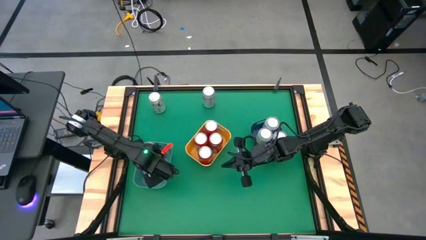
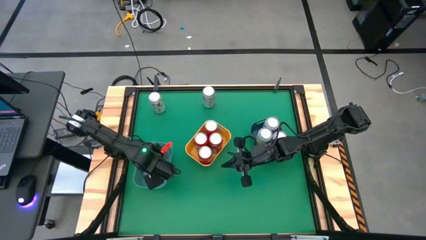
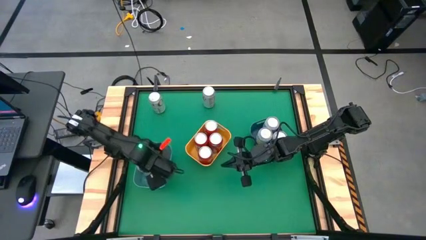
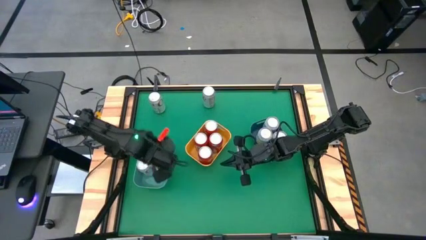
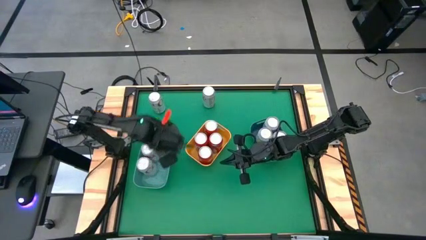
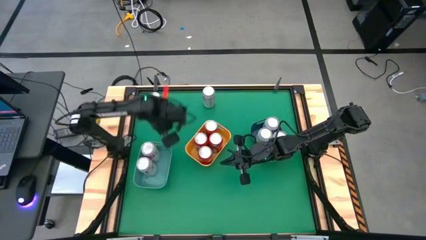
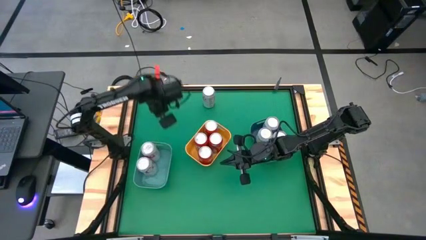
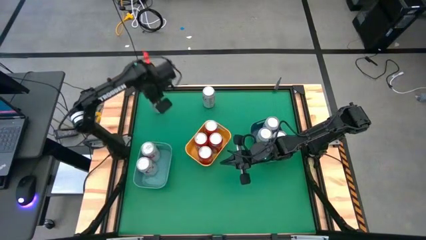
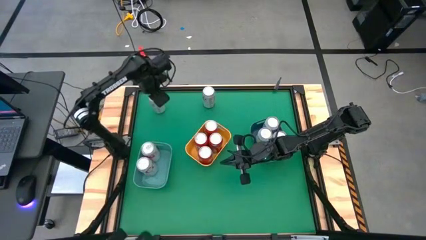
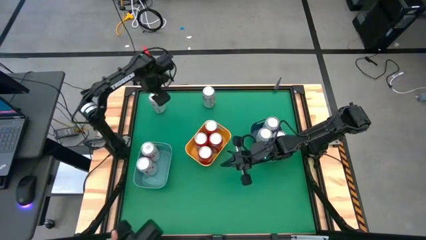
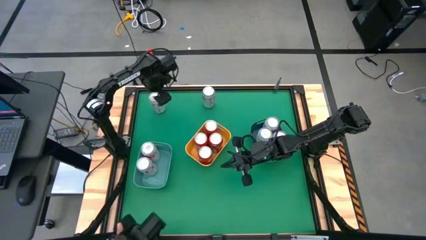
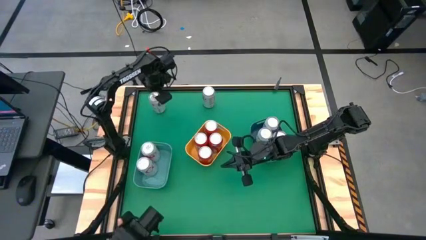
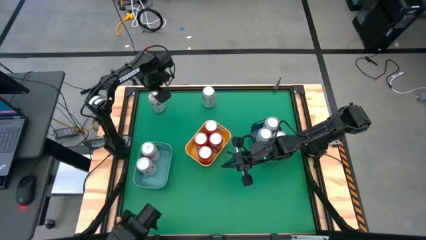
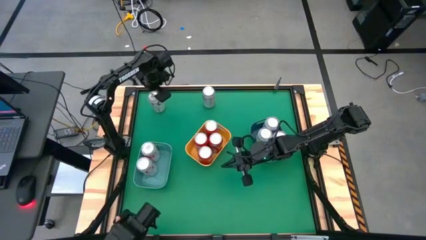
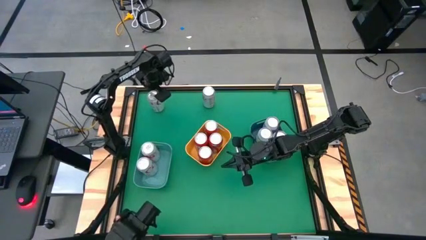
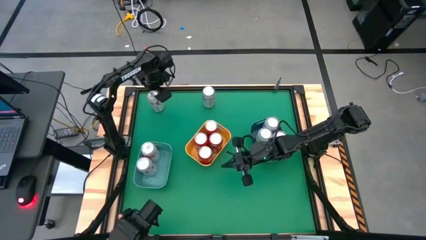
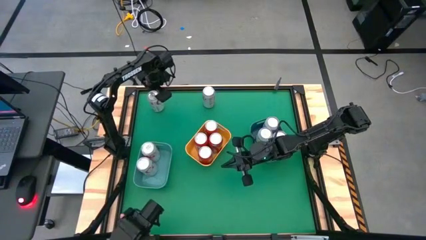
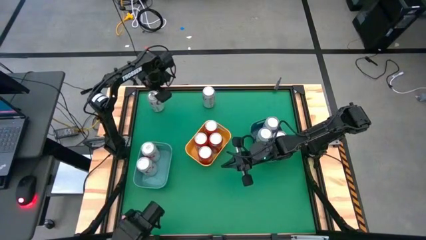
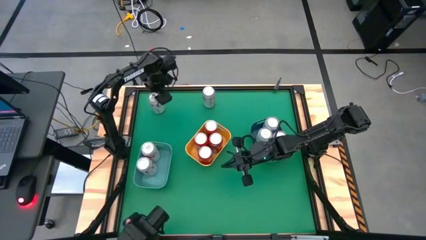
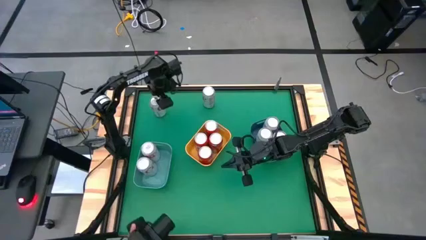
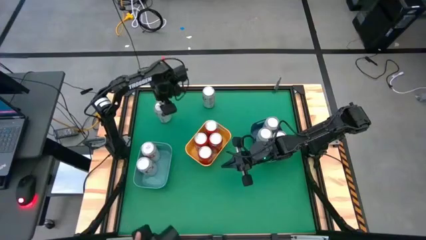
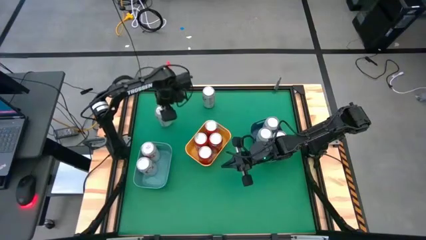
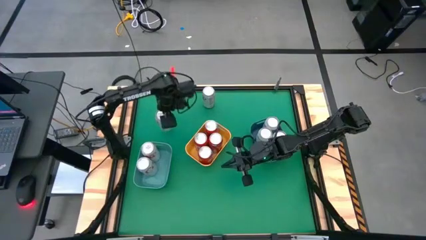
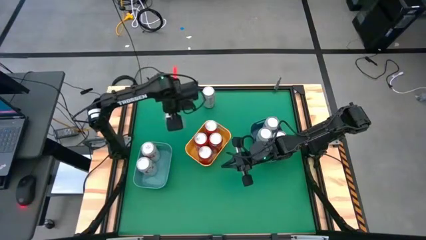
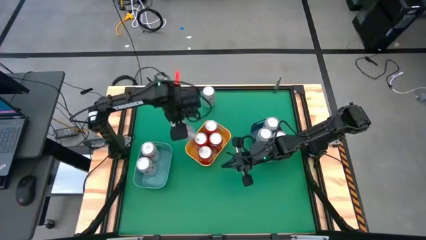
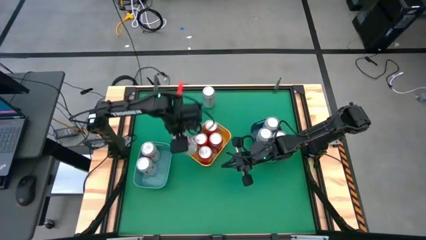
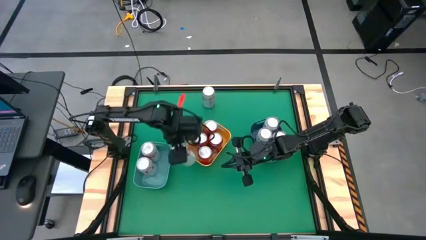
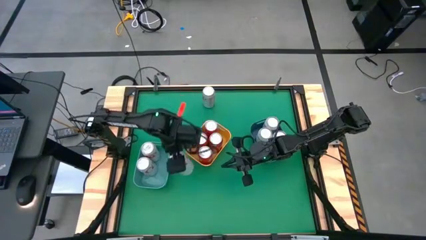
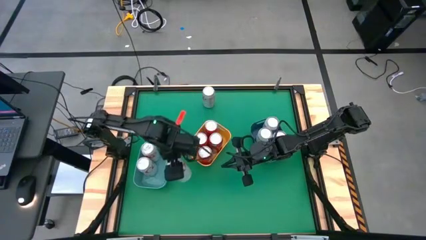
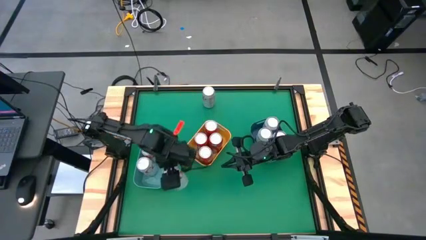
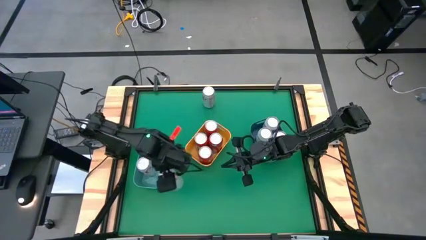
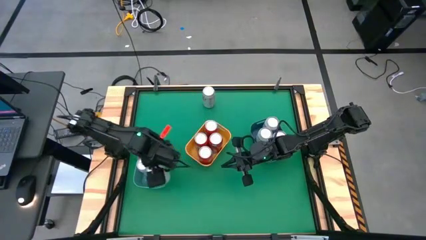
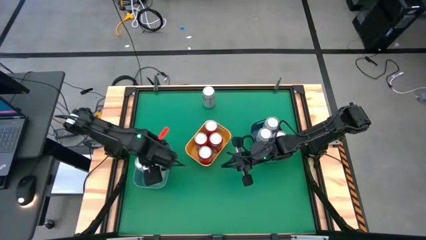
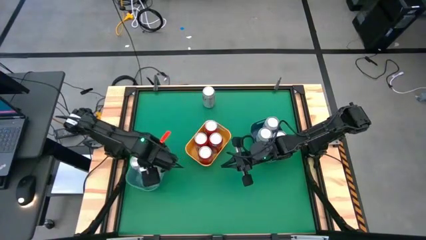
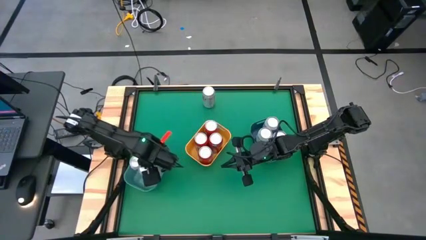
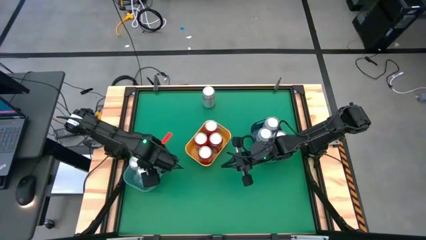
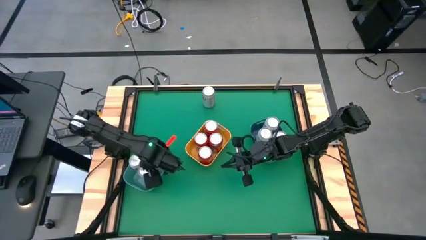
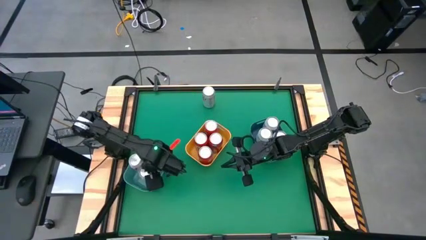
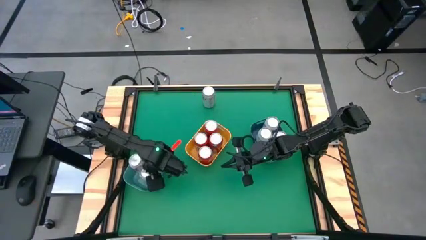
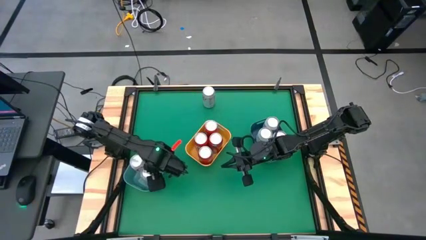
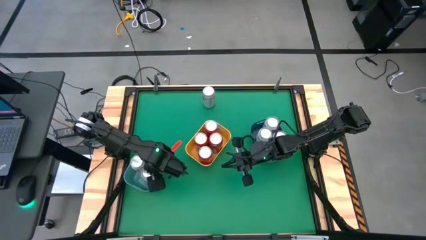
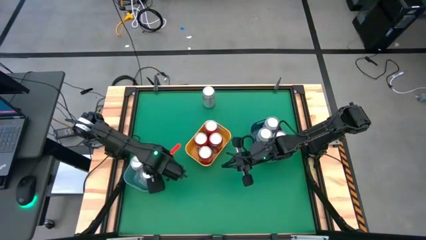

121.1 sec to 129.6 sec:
Task: Sort soda cans
Put the left white soda can into the green bin

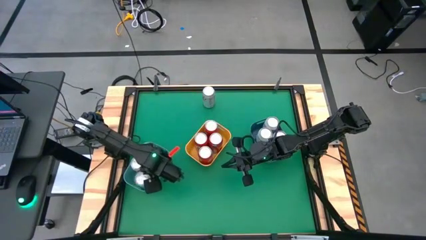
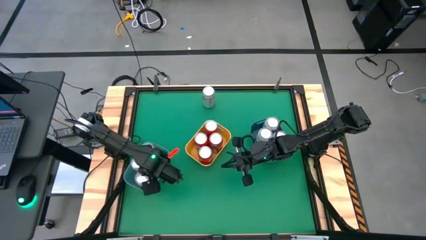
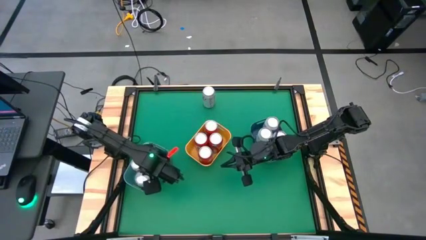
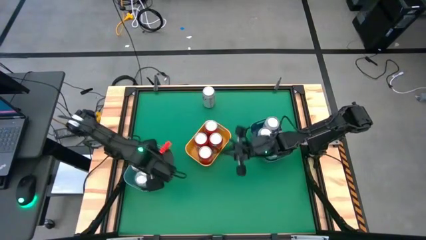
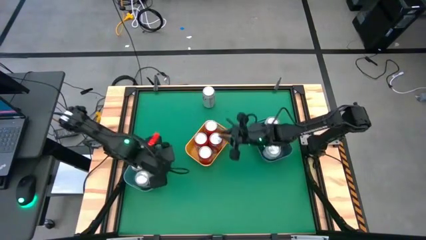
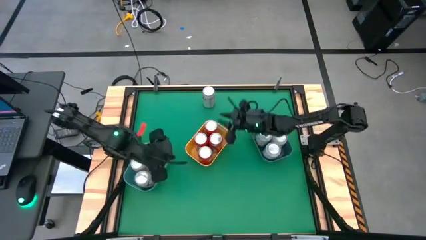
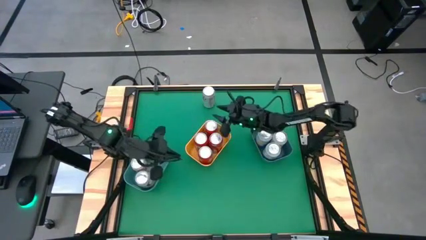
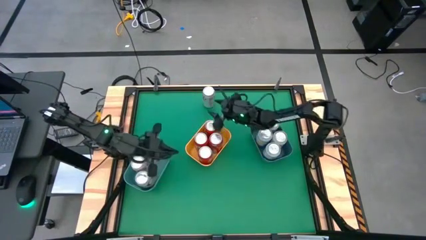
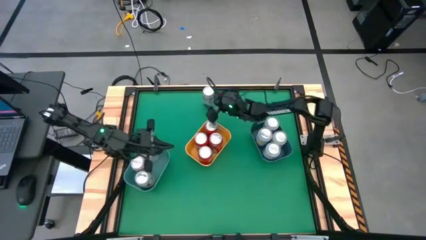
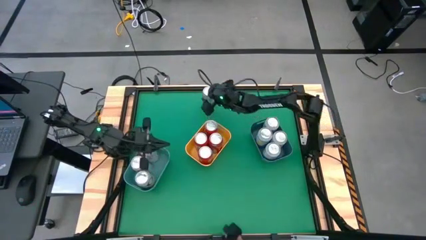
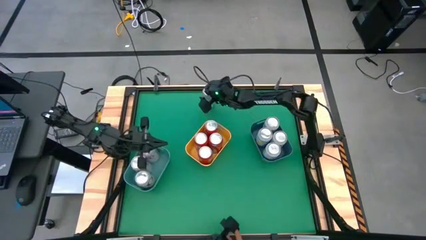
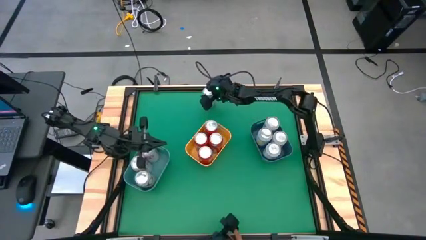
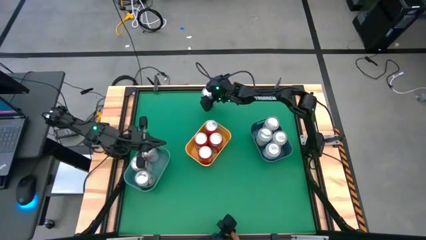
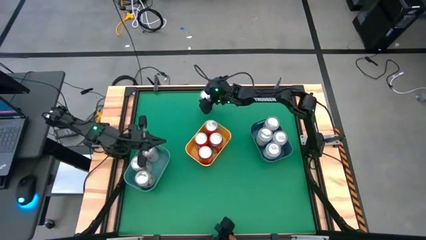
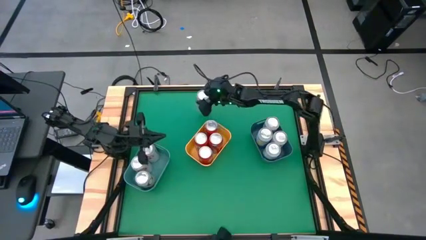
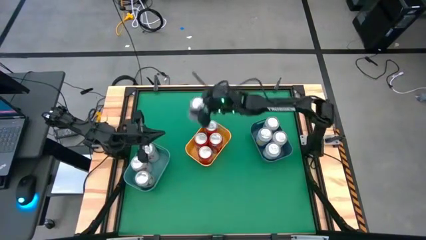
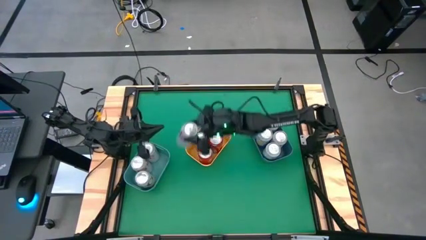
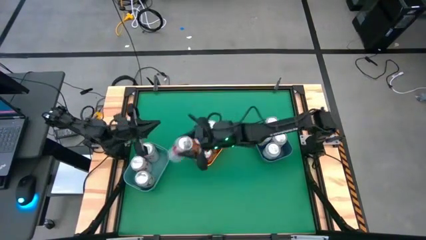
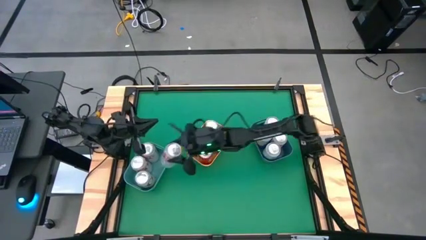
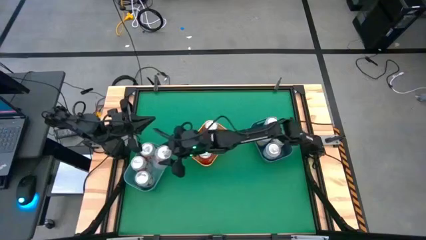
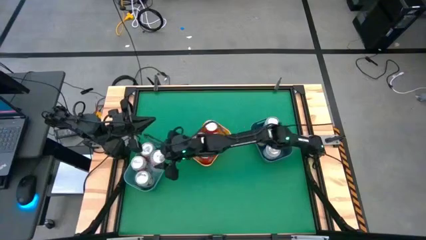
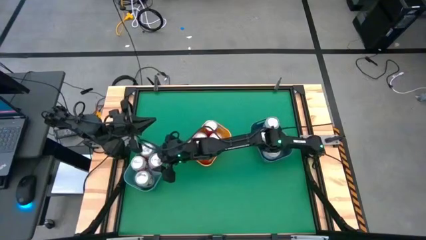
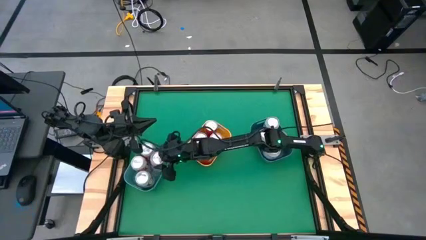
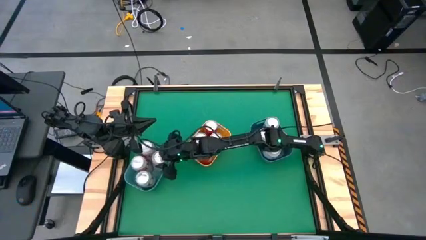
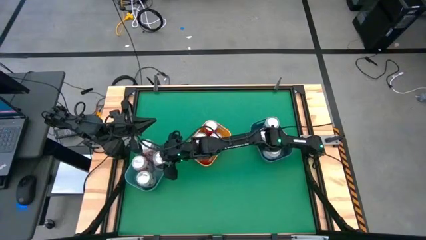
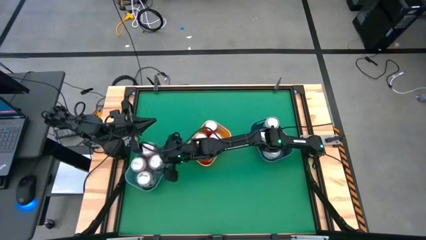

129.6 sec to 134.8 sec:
Put the white soda can into the green bin
